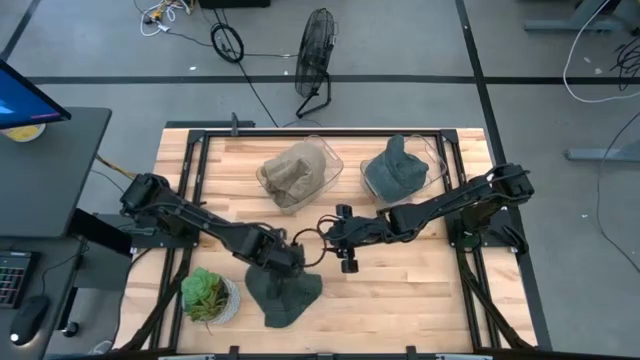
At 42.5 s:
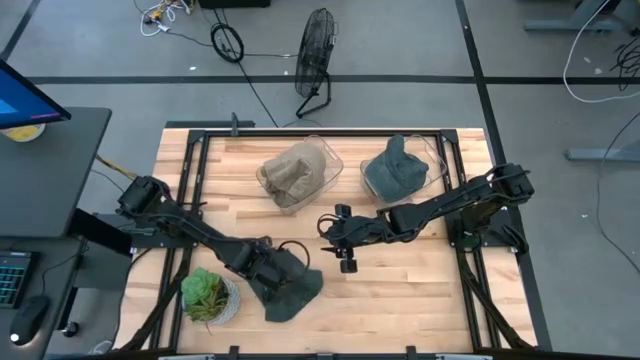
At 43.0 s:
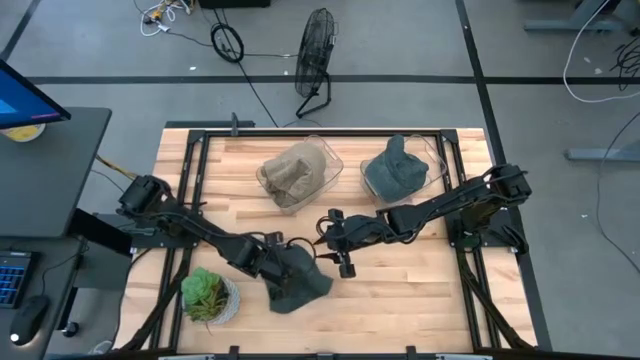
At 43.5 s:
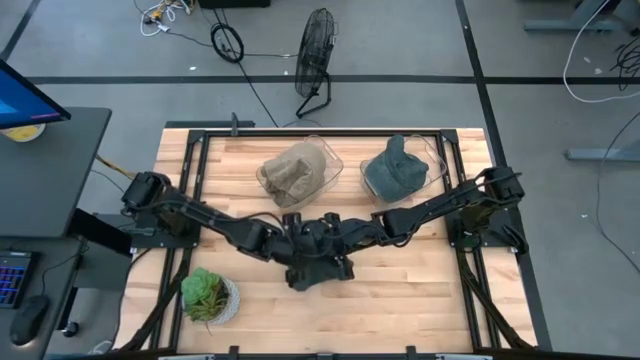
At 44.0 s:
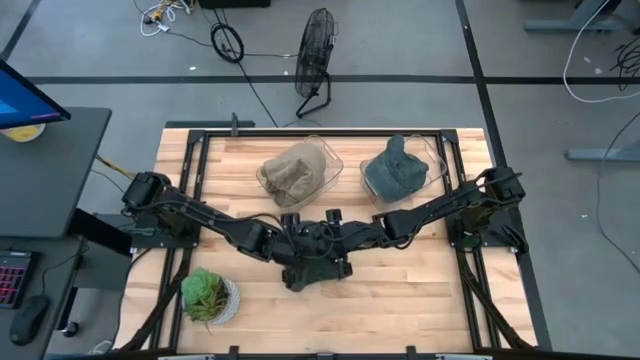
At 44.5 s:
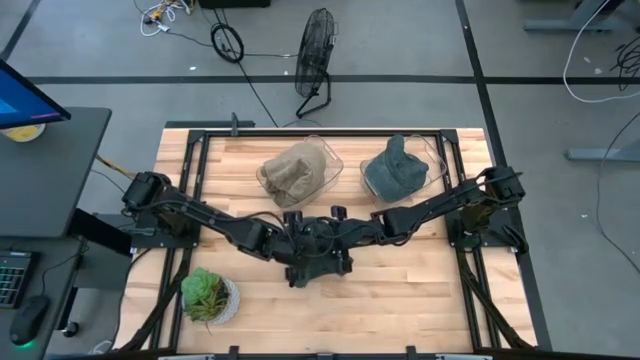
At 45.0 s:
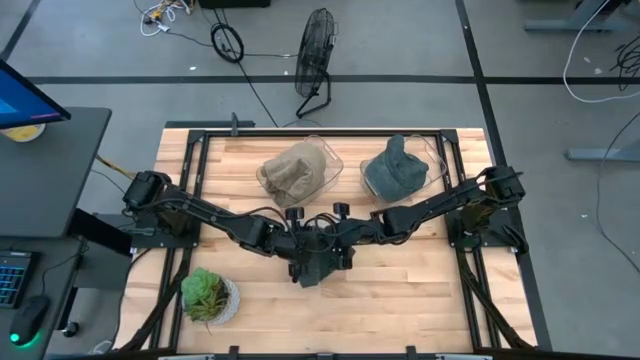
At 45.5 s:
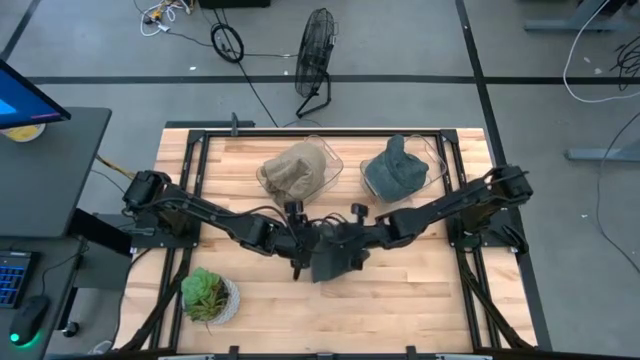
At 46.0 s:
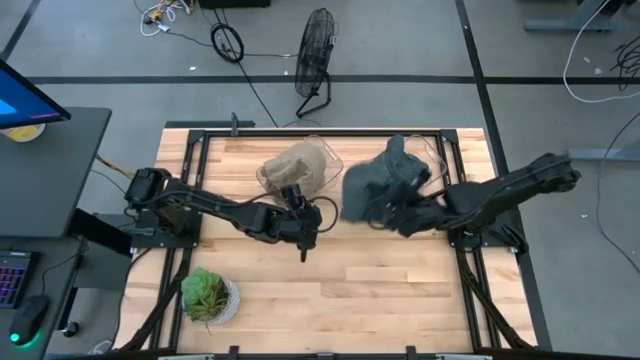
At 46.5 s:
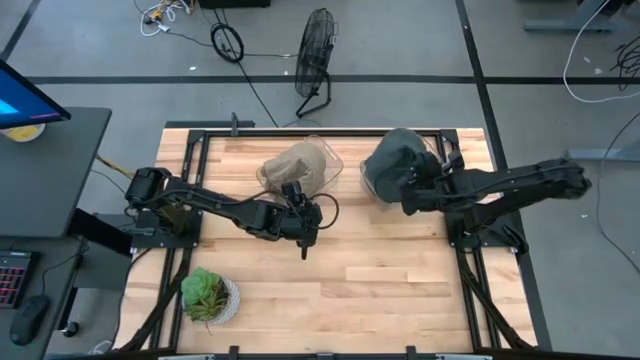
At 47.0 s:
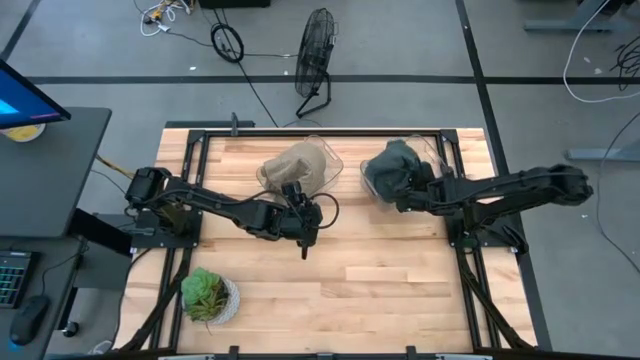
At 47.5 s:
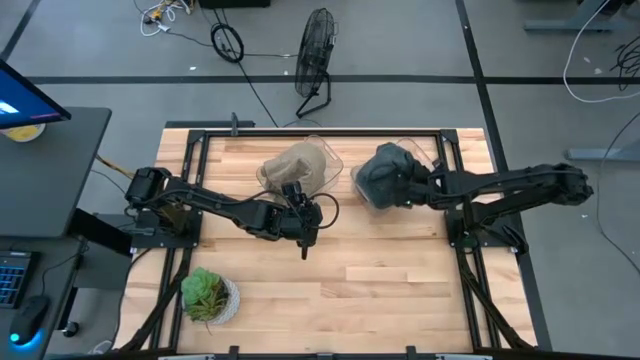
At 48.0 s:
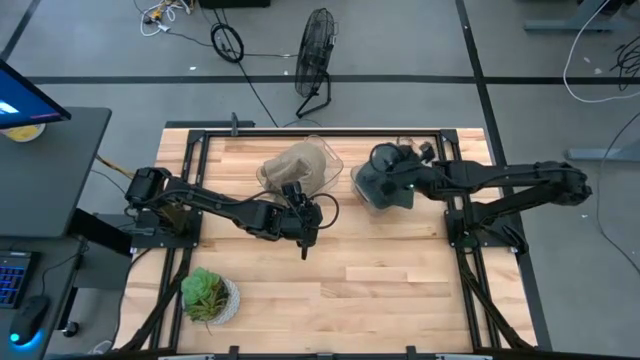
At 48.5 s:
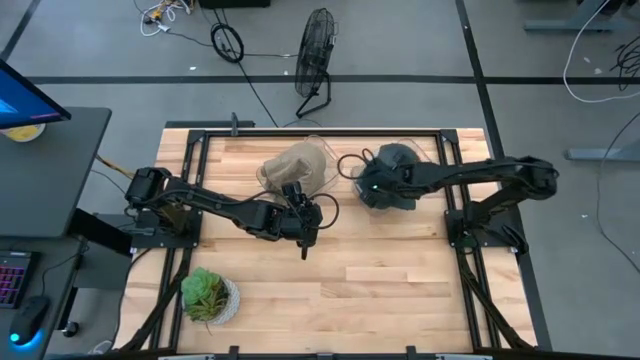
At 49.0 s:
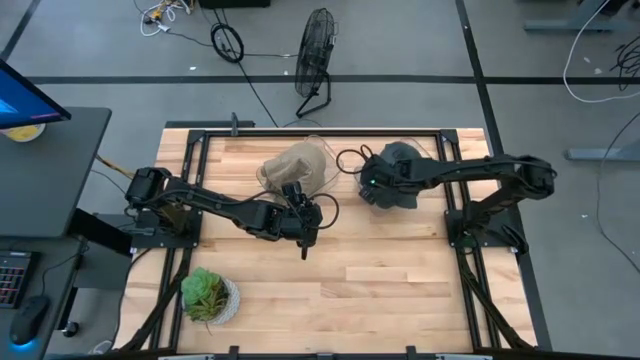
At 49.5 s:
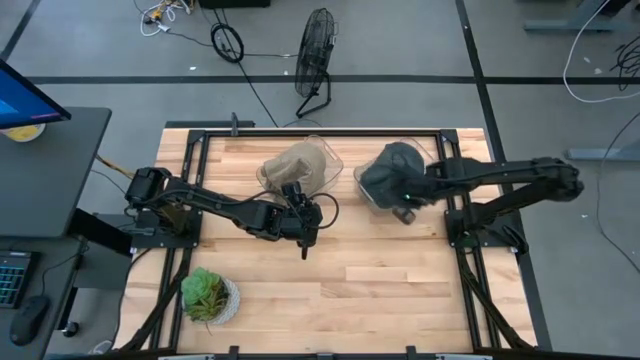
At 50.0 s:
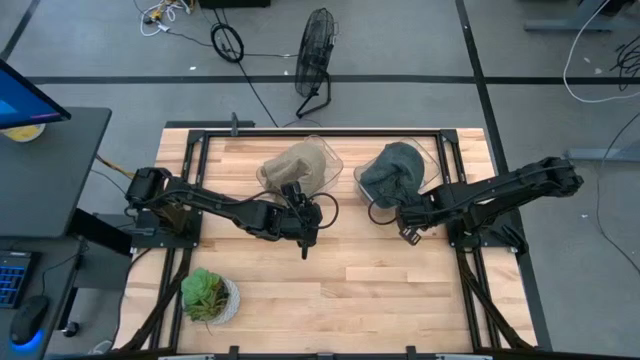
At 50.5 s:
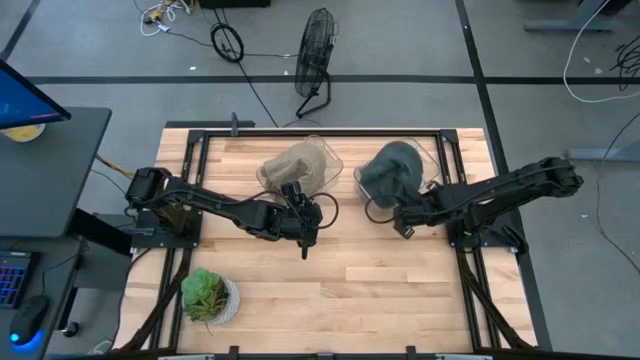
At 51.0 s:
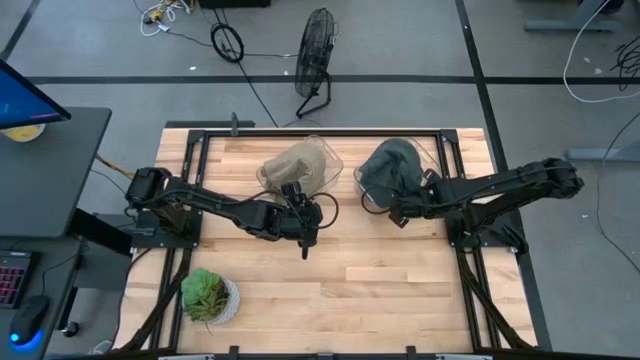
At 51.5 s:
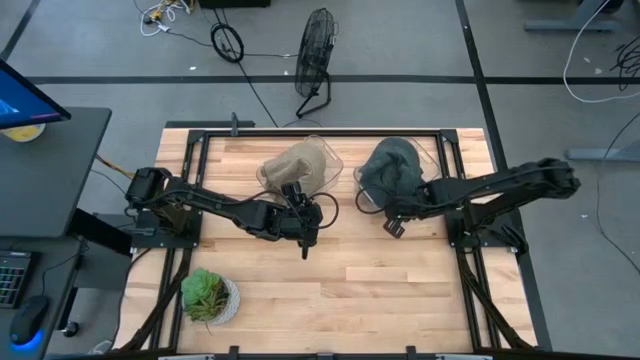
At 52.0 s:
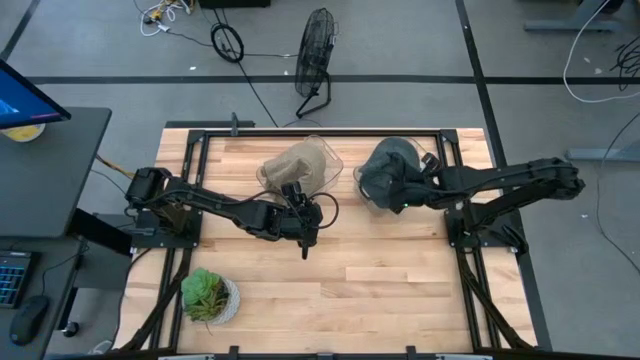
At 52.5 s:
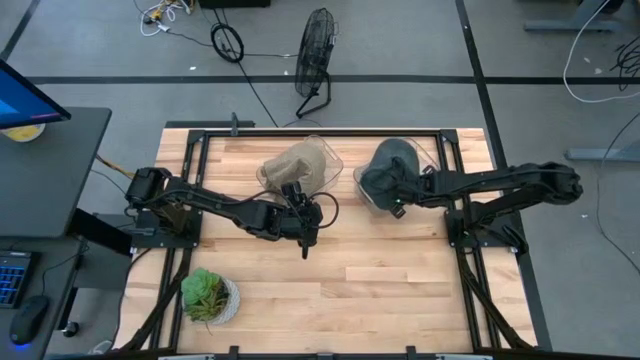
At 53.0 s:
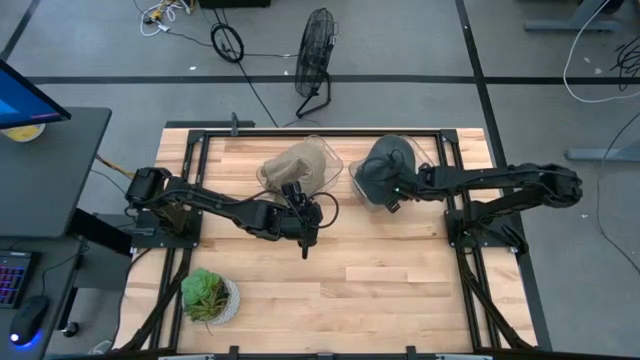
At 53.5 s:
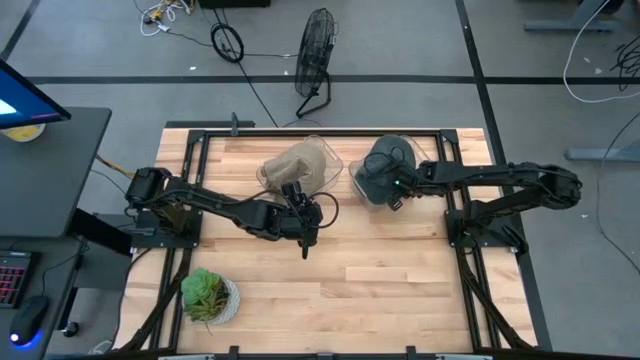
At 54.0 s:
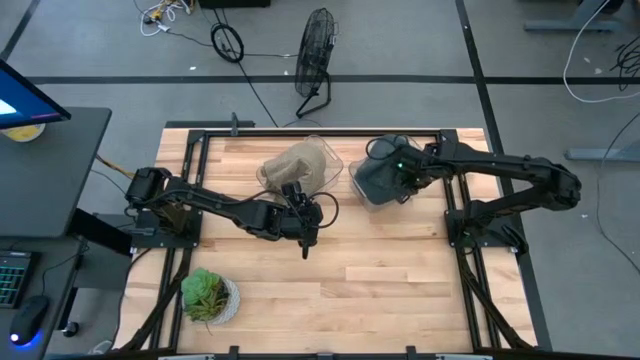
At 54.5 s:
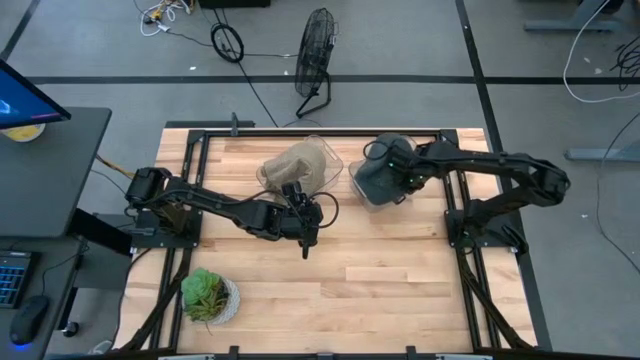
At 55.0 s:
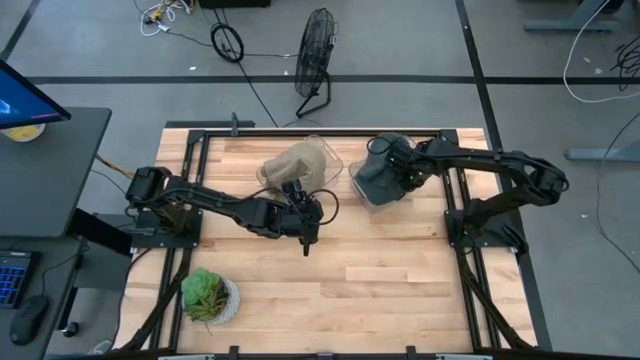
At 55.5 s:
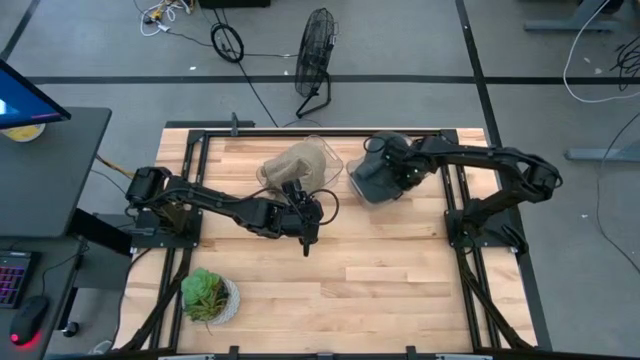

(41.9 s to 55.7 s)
Task: Pick & Place hat
Put the black cap into the right transparent bin

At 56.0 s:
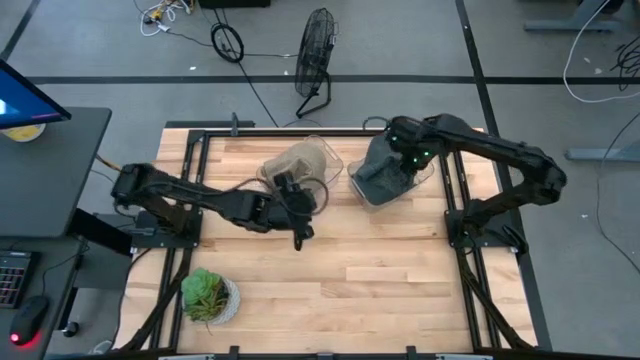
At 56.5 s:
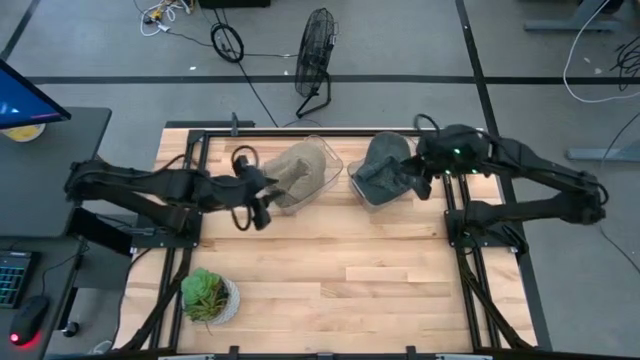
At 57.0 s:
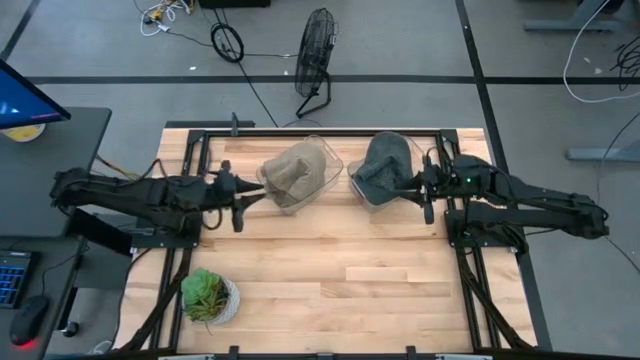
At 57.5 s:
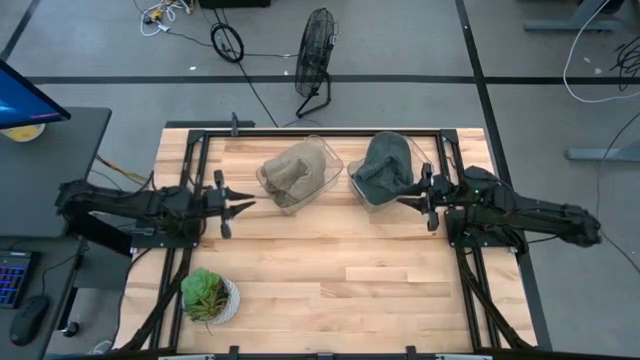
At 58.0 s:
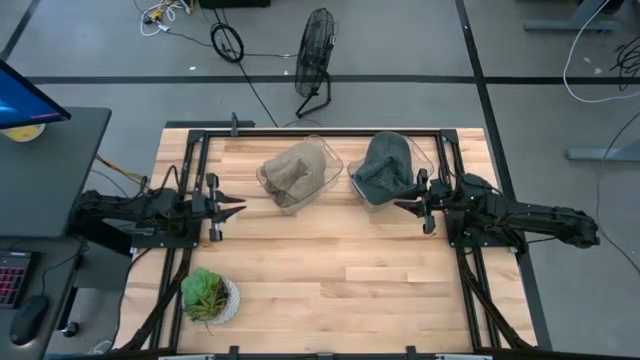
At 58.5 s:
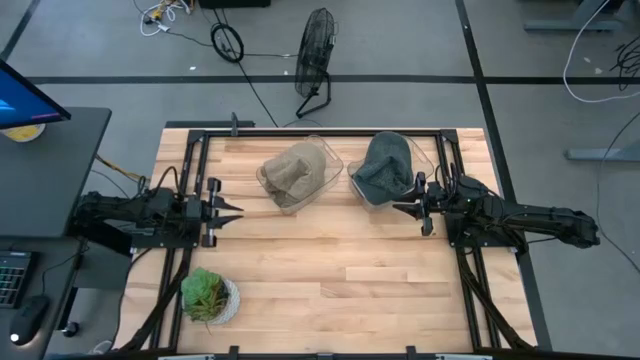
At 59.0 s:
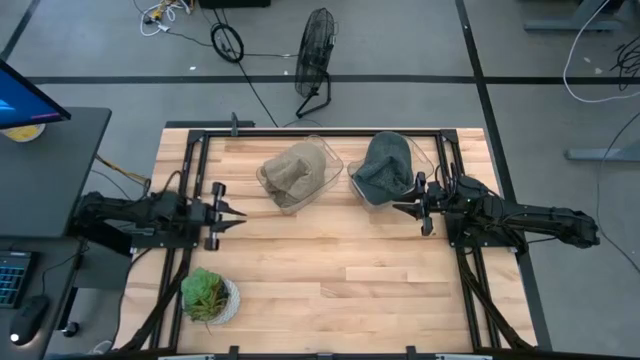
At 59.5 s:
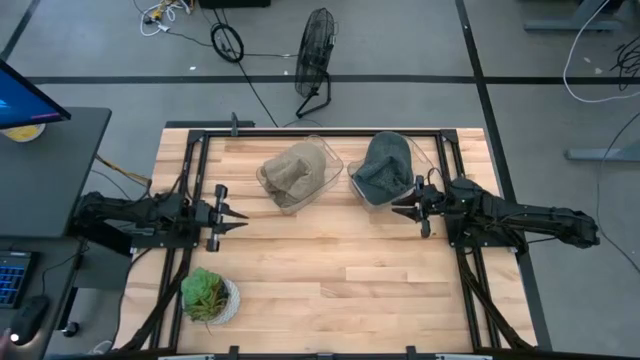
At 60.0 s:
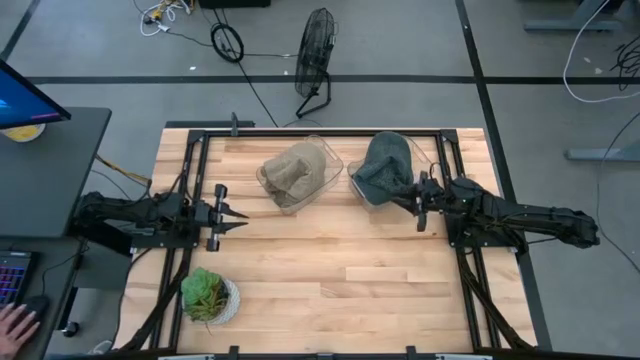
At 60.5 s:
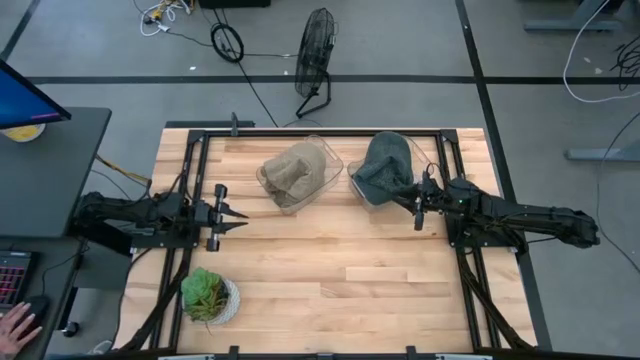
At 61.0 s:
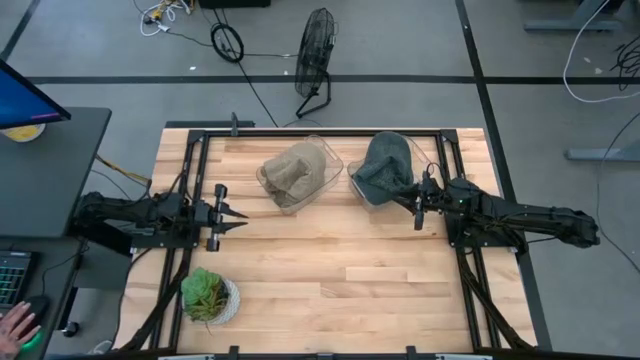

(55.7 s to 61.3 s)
Return to Home Position

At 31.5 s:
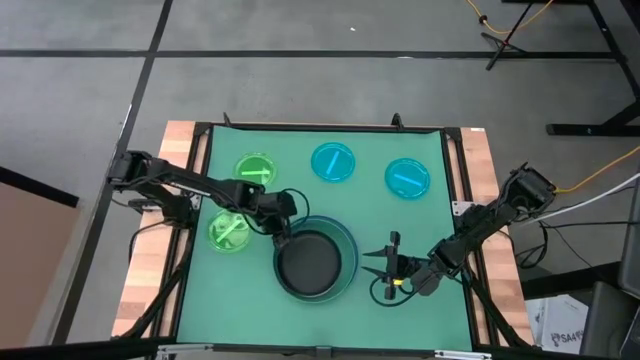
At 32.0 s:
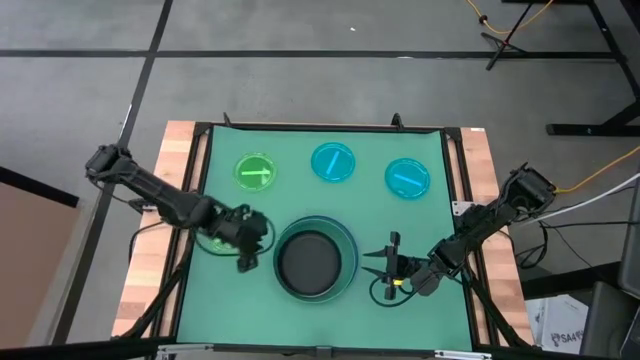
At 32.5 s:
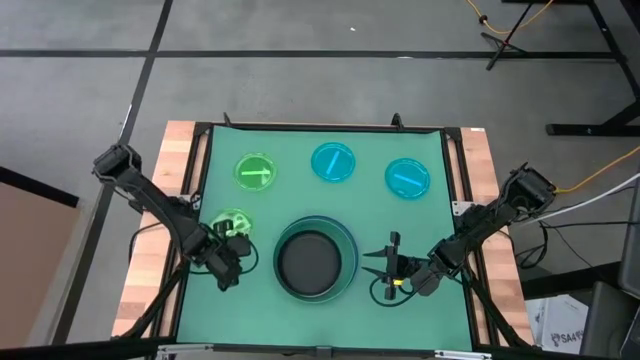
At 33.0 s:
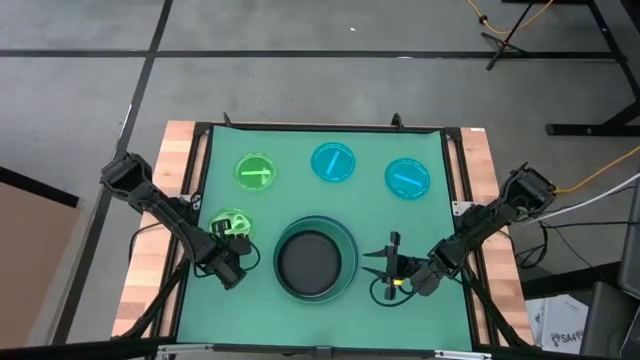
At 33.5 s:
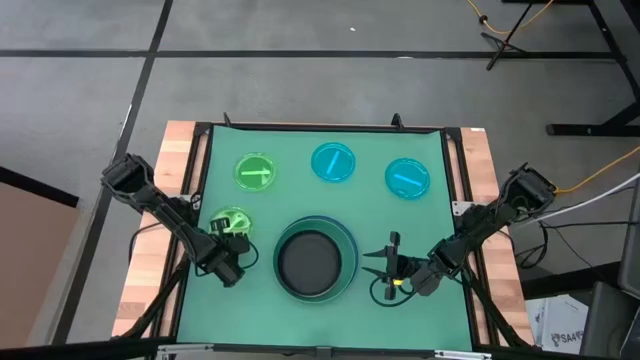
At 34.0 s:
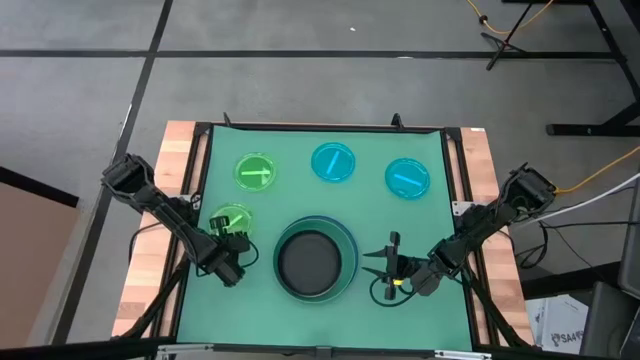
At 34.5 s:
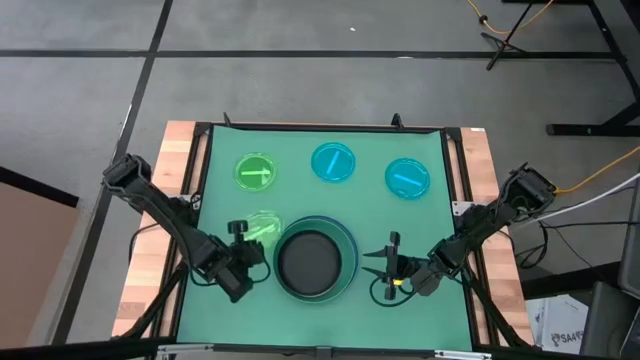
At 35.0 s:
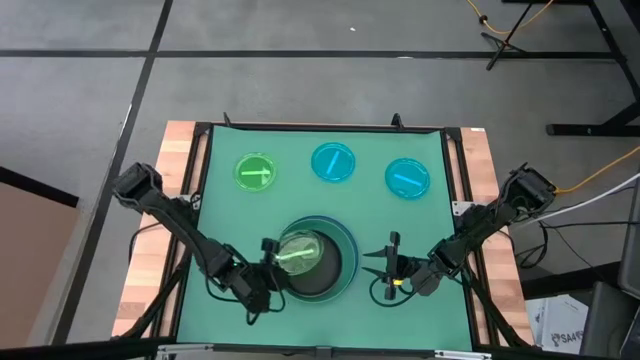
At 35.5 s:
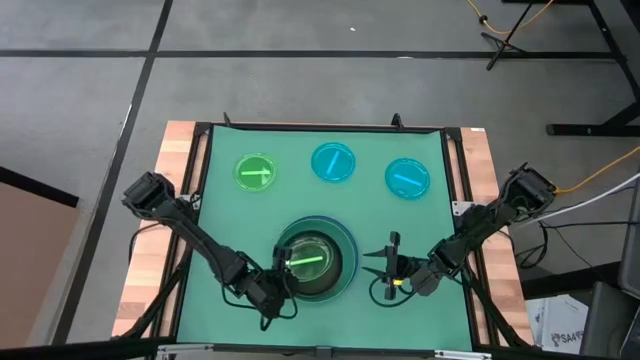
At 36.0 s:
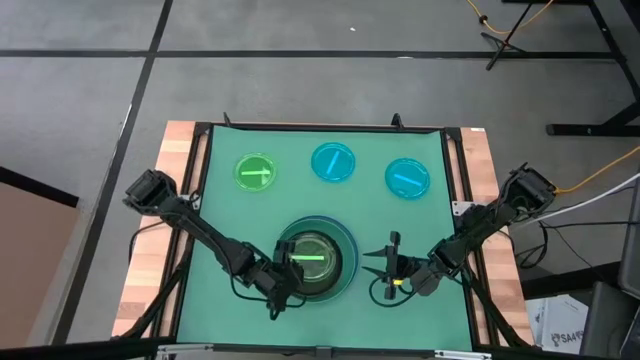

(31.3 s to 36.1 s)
Task: Stack plastic plates
Stack the bottom green plate on the black plate
